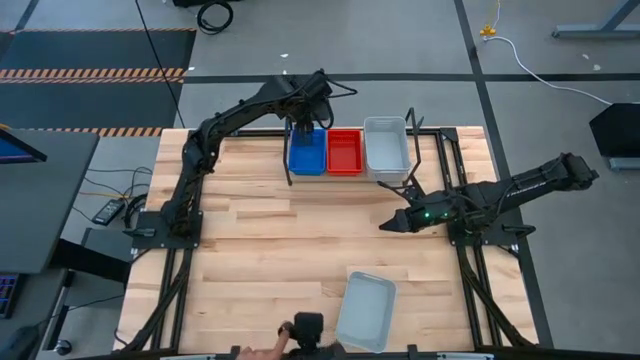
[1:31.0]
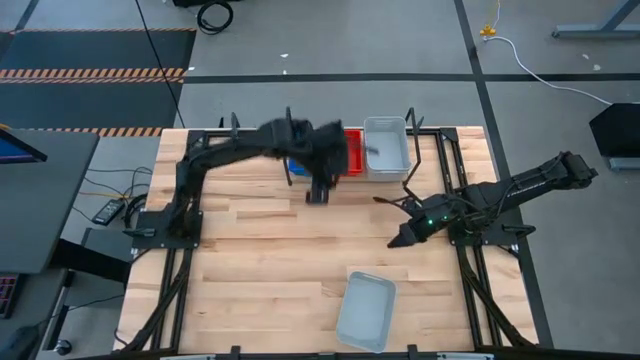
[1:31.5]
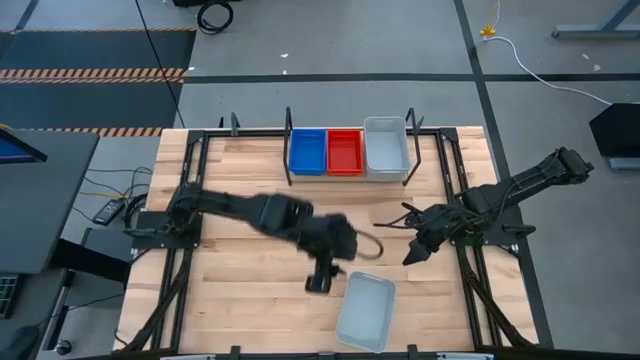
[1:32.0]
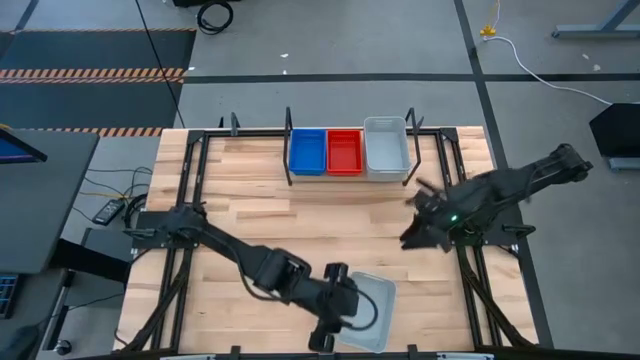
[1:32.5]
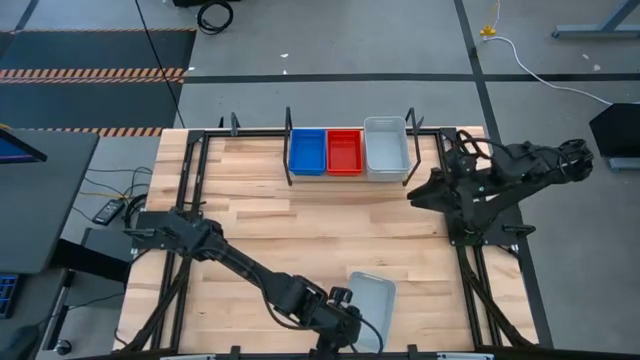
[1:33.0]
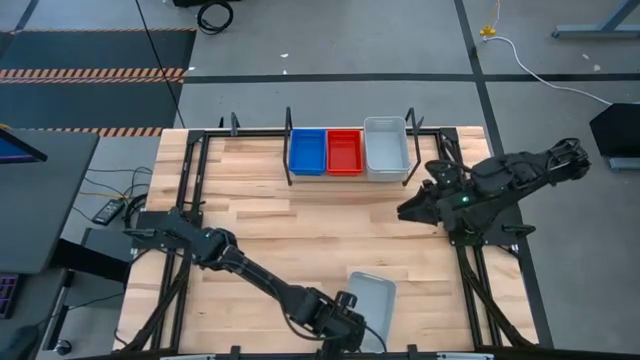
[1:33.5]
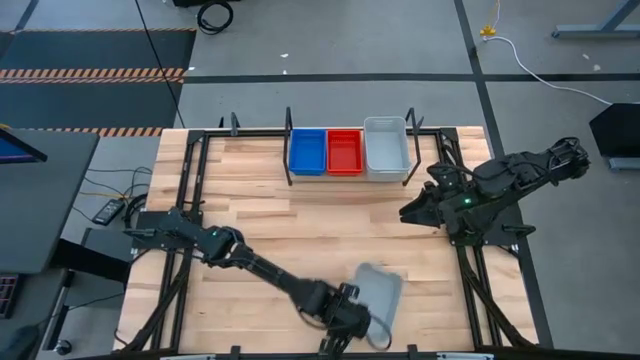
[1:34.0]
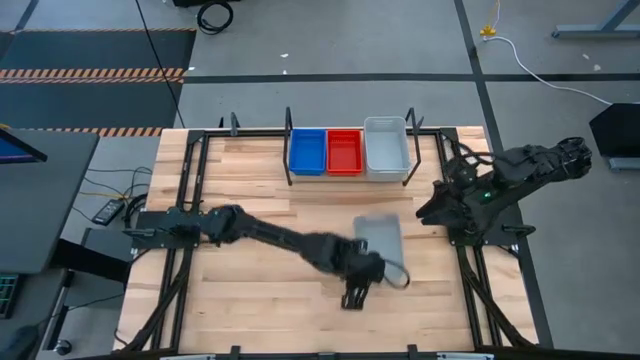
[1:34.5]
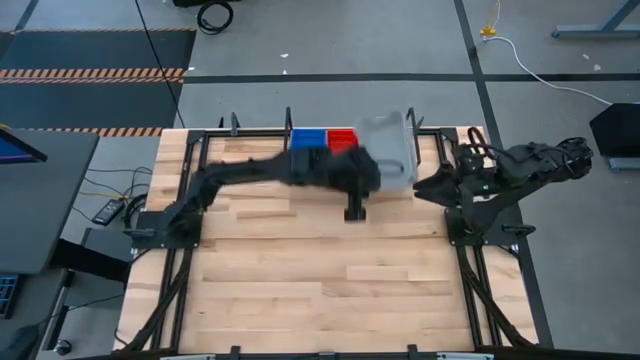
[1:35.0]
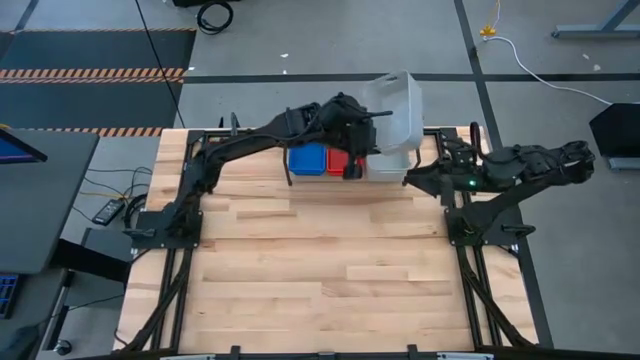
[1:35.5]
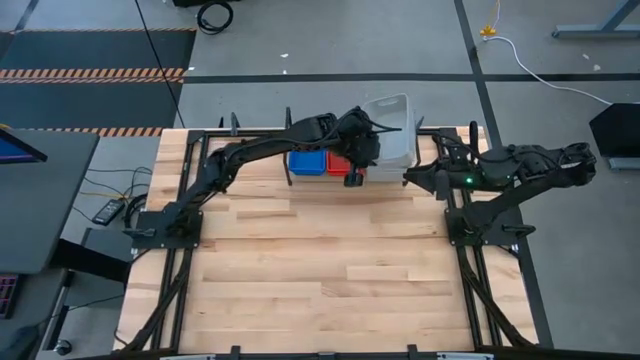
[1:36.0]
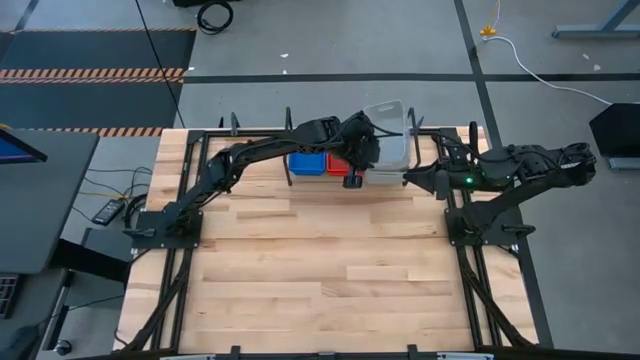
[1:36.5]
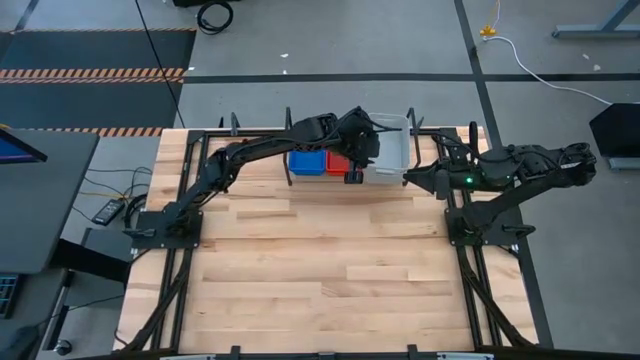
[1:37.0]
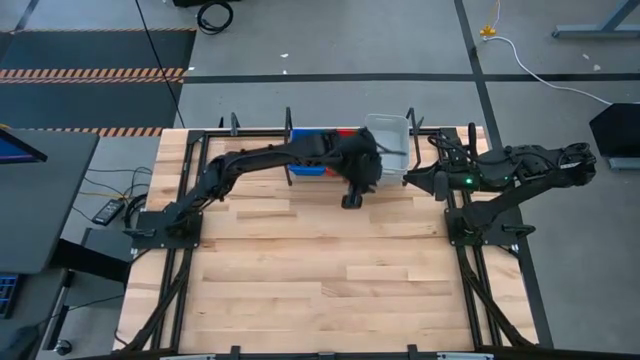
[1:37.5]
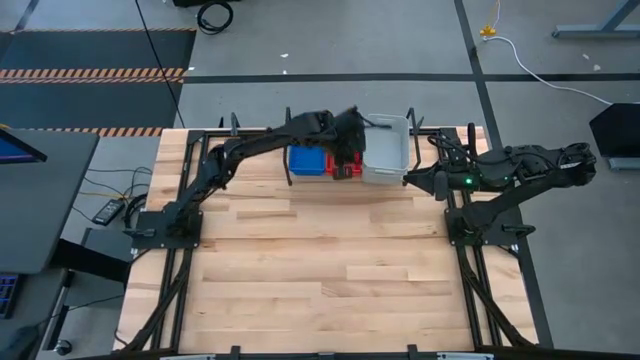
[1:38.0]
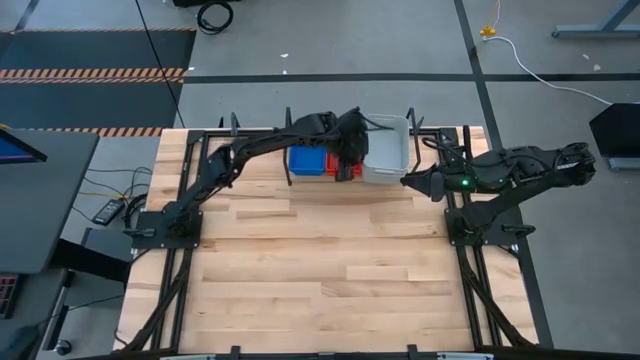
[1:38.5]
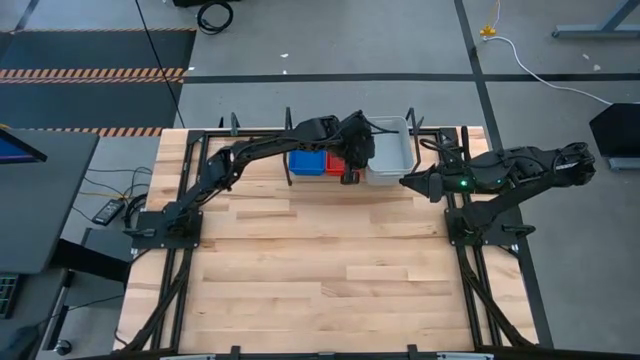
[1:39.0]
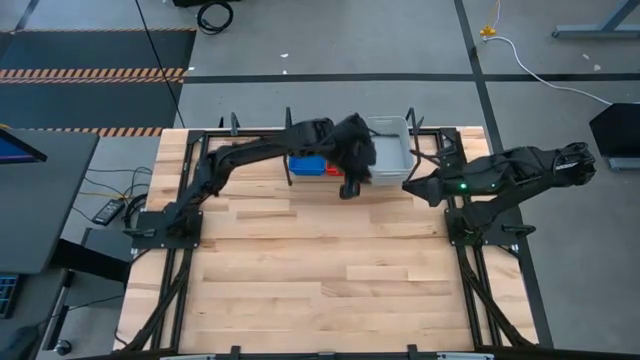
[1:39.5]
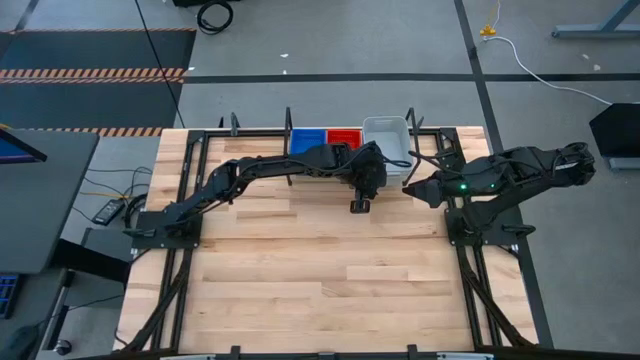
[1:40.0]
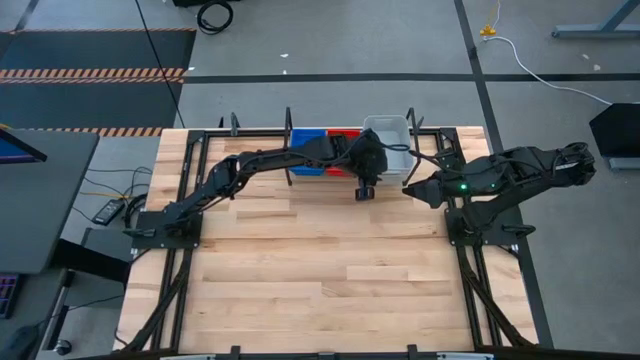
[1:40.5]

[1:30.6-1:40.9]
Task: Stack baskets on shelf by color
Stack the gray bin on the gray bin on the shelf

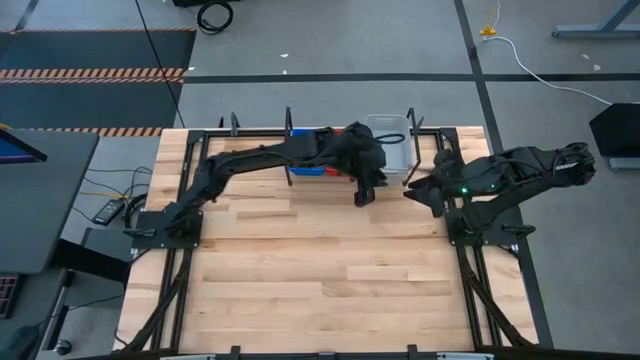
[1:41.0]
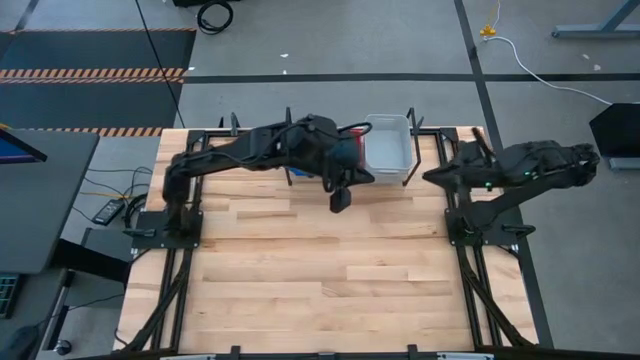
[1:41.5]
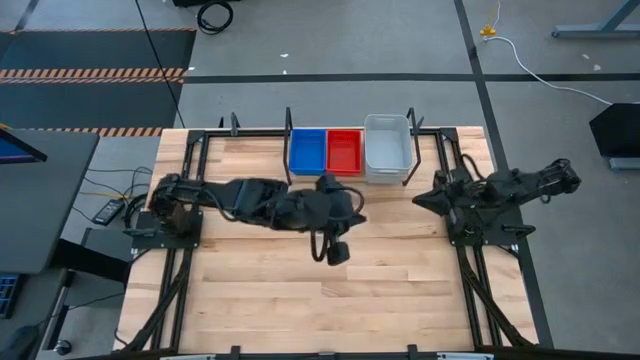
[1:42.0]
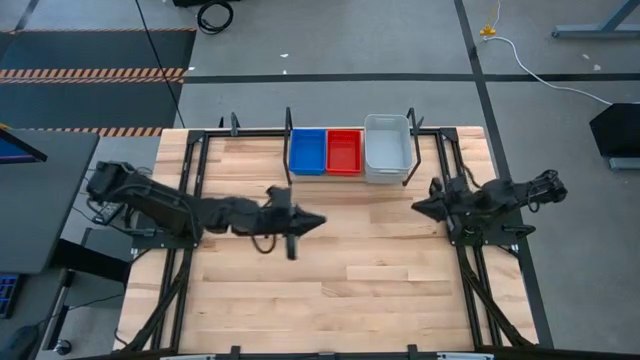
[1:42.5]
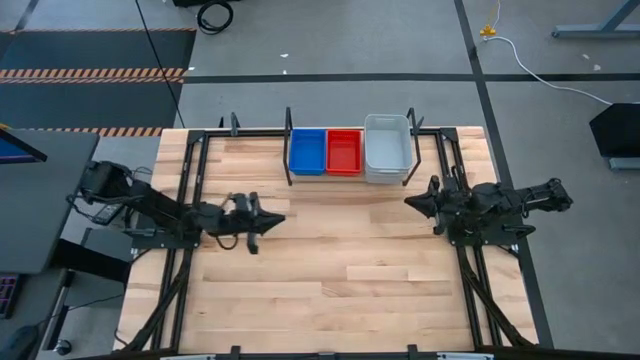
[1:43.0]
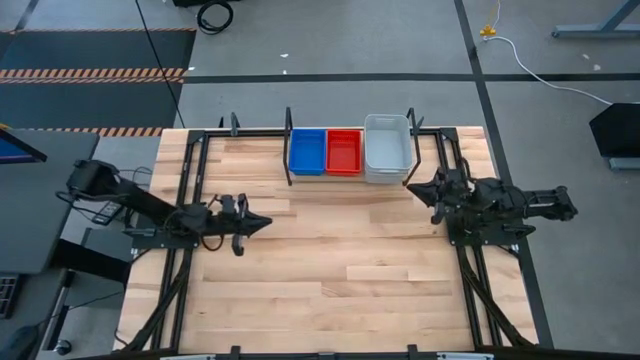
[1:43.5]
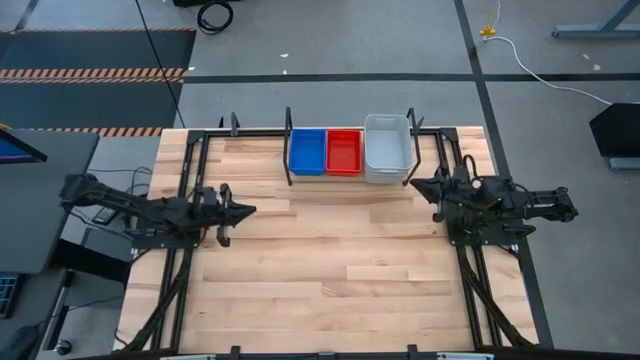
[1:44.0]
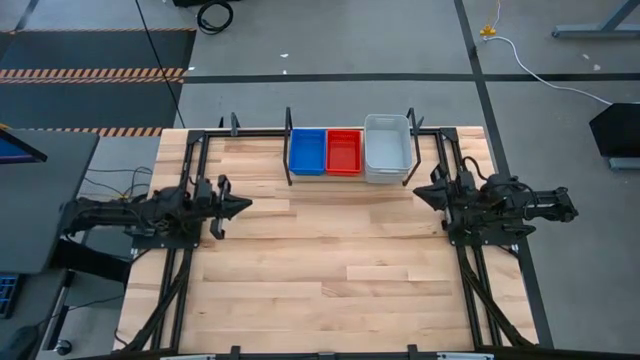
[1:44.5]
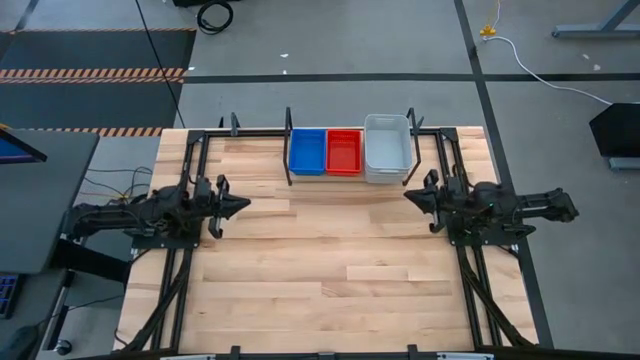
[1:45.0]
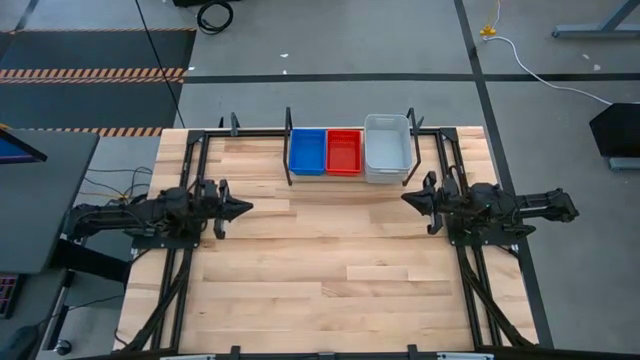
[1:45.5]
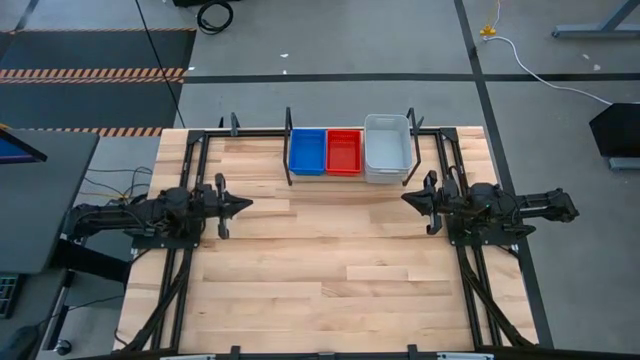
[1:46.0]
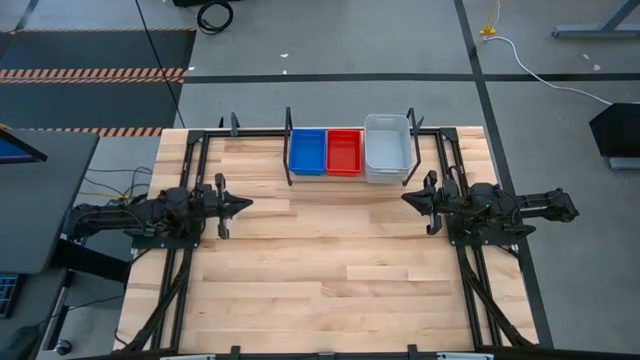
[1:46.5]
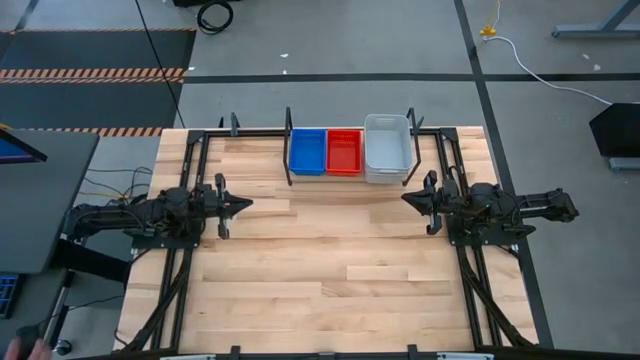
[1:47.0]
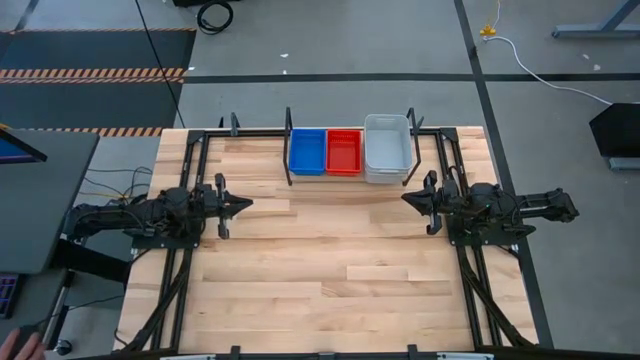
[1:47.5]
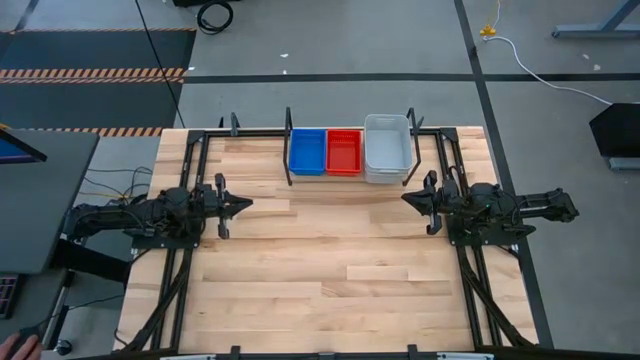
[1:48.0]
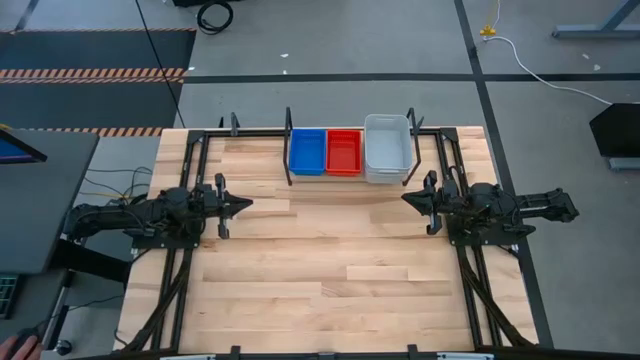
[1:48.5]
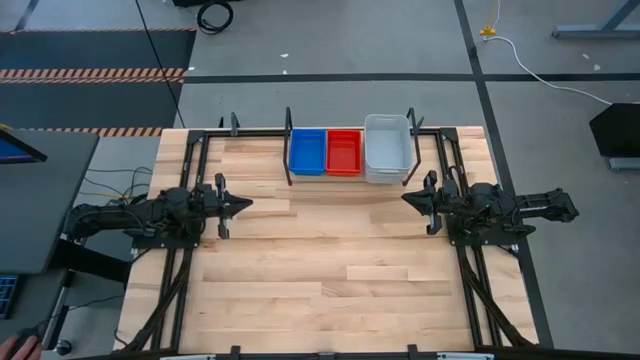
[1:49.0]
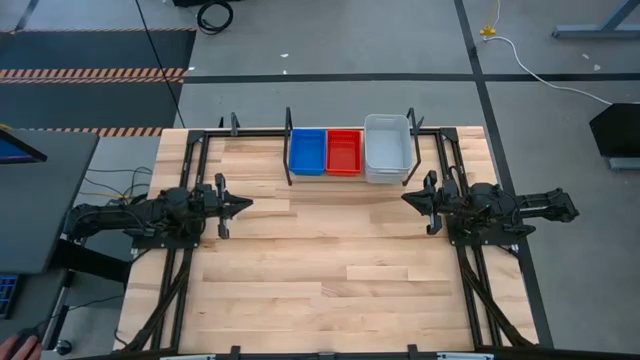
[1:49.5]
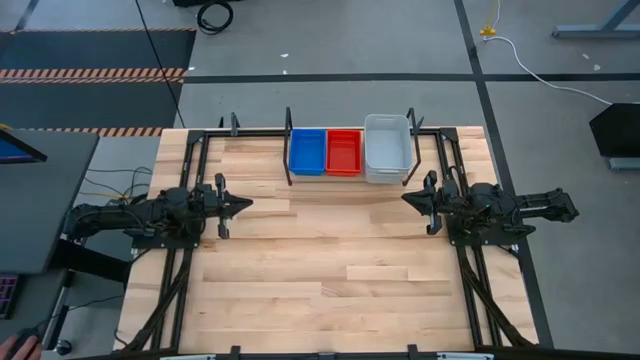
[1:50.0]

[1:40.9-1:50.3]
Return to Home Position

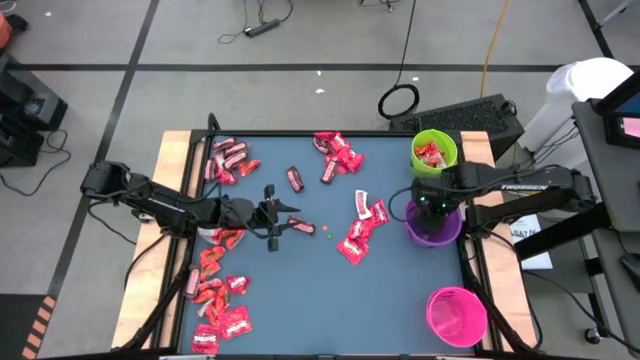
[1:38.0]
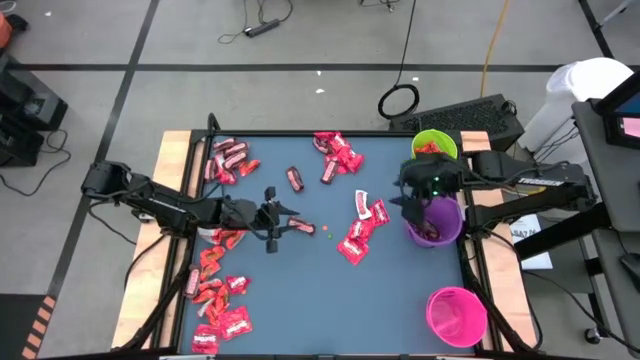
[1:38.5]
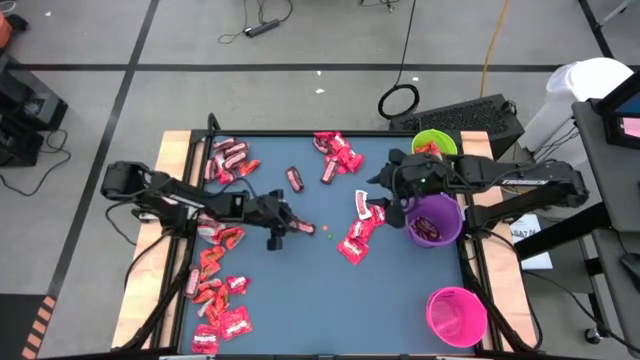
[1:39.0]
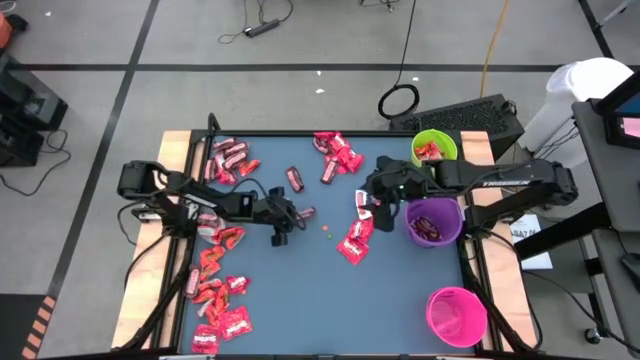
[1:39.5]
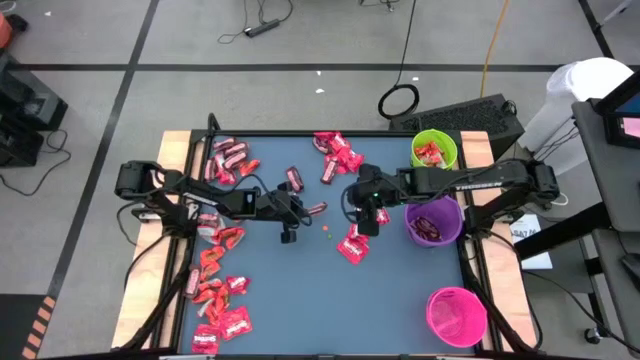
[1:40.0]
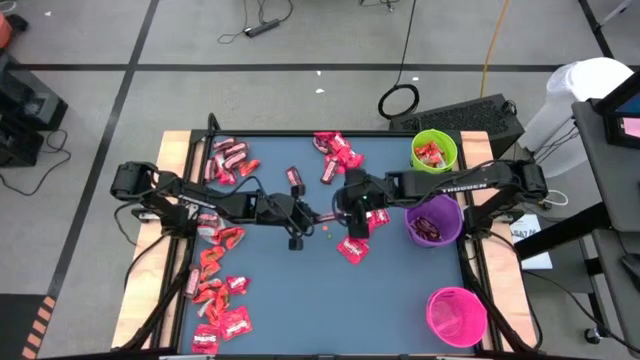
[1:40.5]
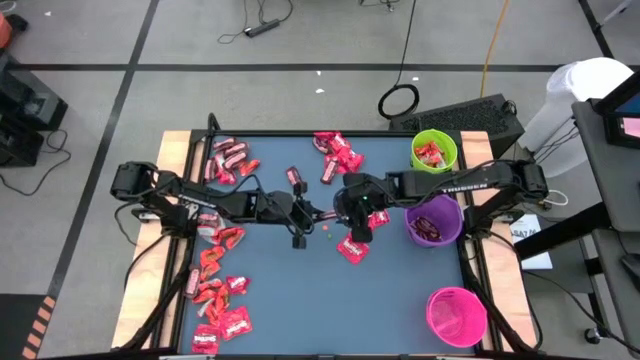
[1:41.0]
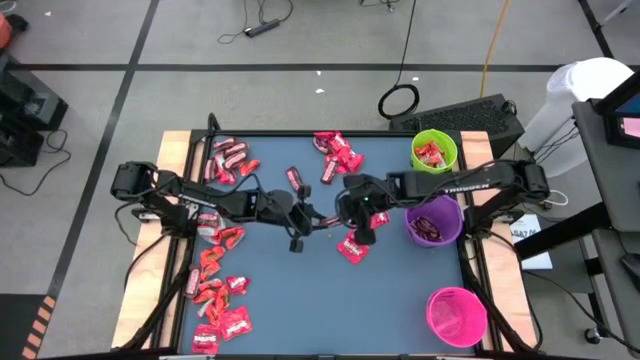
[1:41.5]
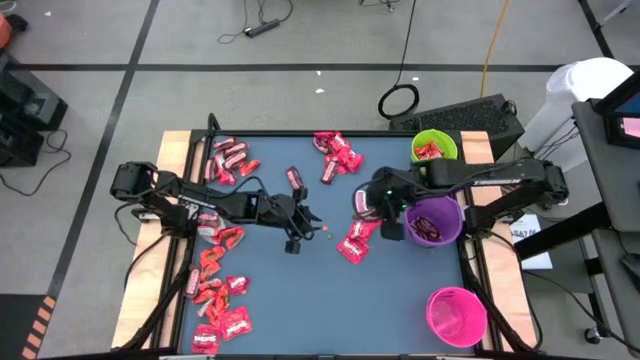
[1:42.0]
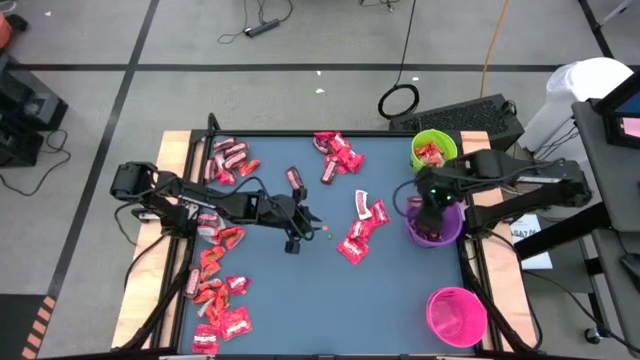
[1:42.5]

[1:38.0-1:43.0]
Task: Organize candy in baskets
Put the brown chocolate bar into the violet bucket
